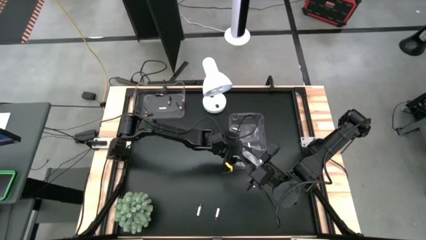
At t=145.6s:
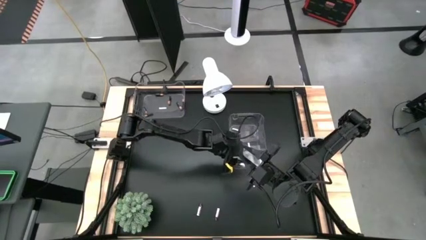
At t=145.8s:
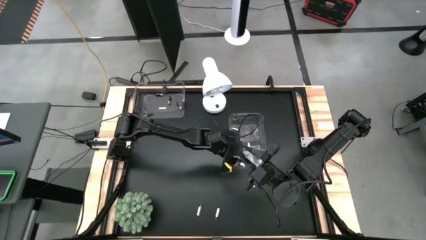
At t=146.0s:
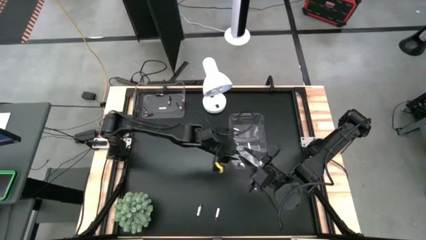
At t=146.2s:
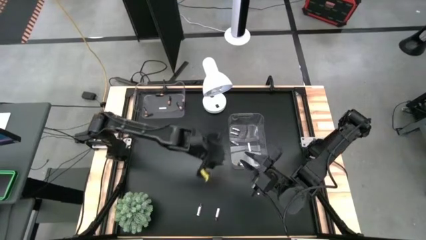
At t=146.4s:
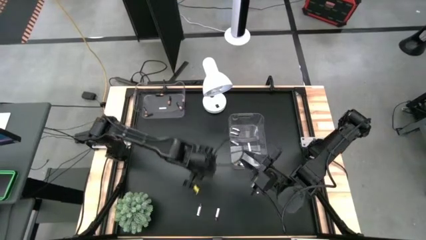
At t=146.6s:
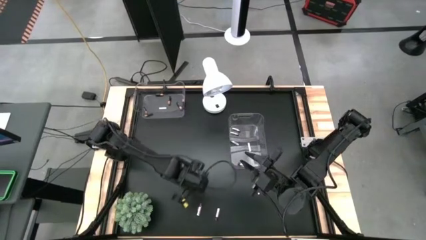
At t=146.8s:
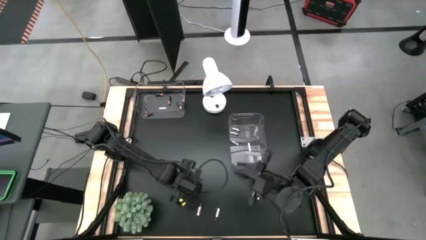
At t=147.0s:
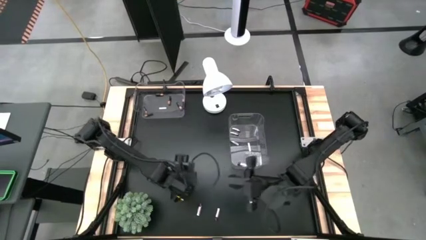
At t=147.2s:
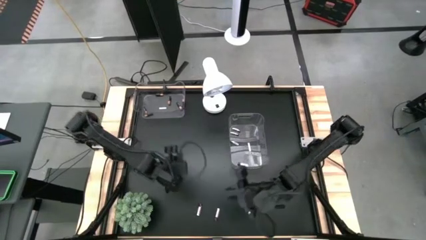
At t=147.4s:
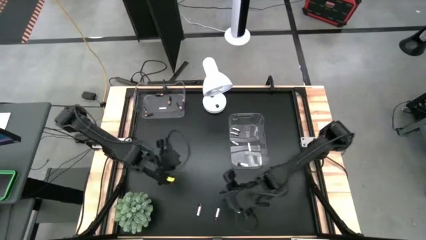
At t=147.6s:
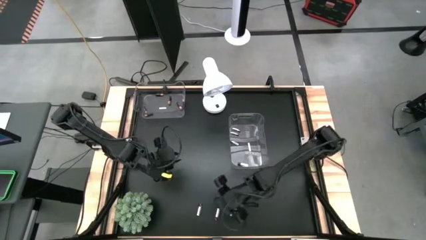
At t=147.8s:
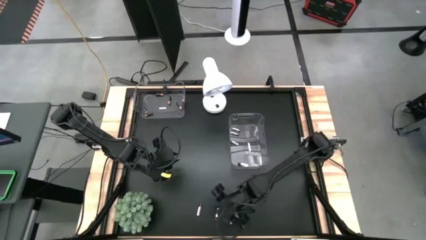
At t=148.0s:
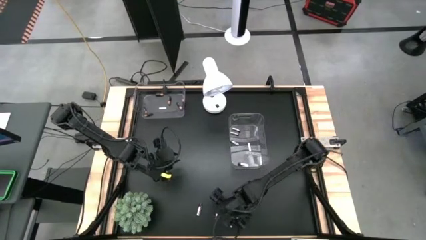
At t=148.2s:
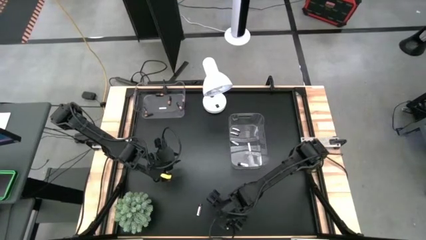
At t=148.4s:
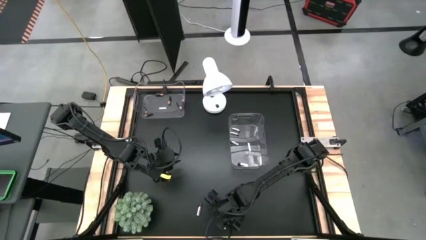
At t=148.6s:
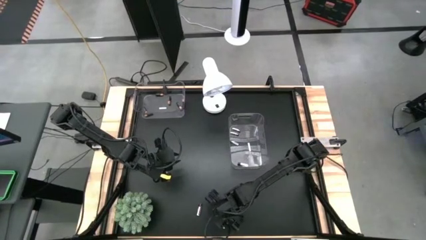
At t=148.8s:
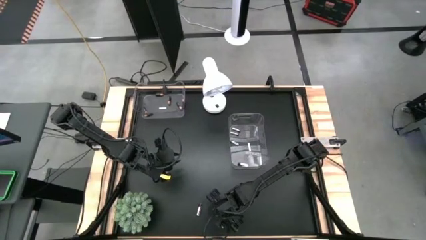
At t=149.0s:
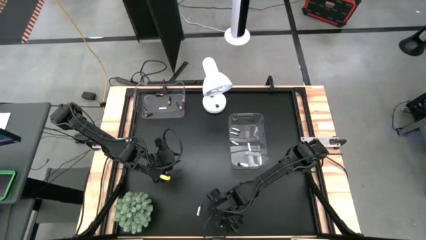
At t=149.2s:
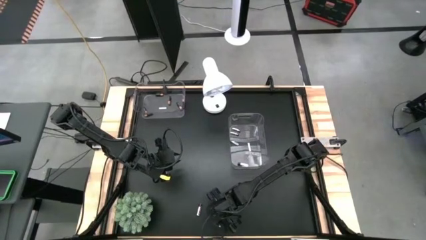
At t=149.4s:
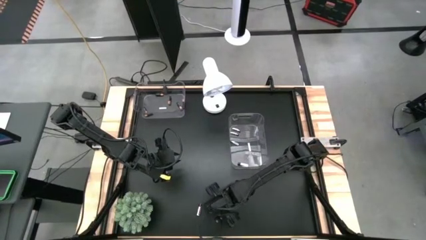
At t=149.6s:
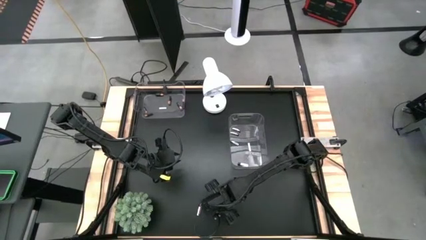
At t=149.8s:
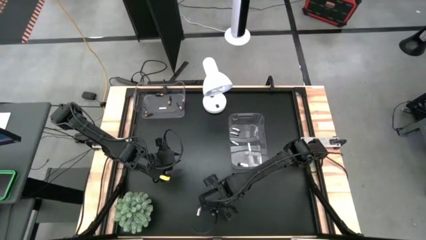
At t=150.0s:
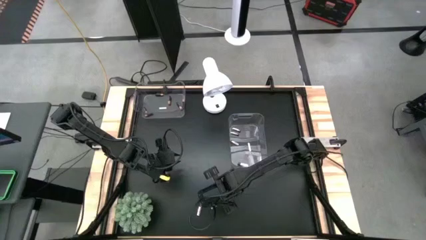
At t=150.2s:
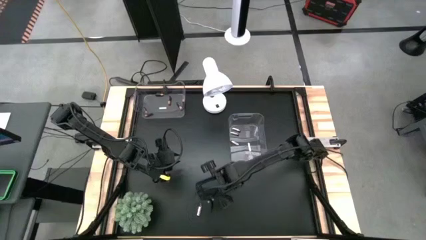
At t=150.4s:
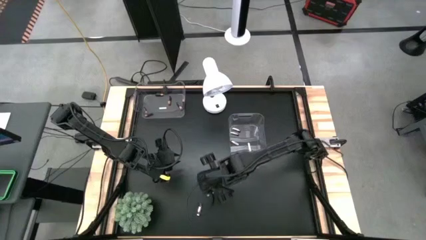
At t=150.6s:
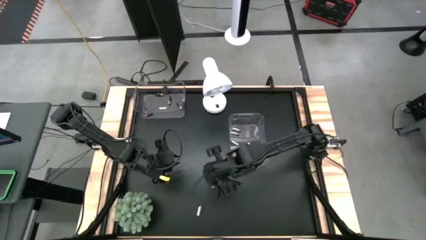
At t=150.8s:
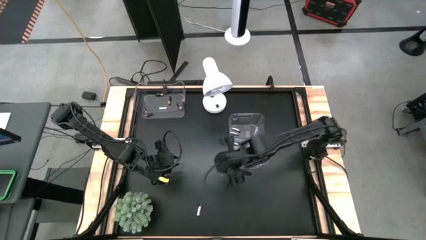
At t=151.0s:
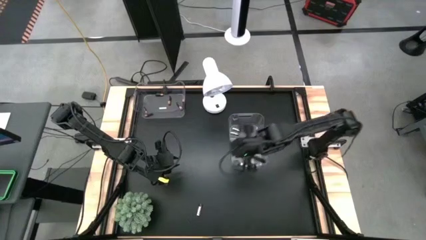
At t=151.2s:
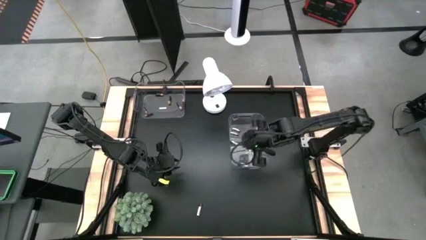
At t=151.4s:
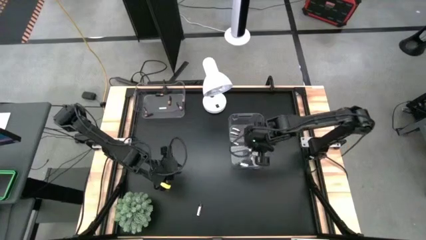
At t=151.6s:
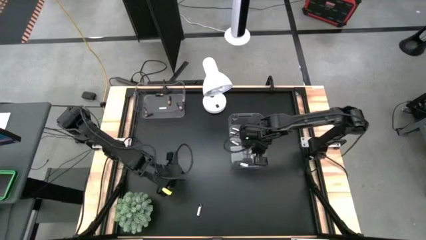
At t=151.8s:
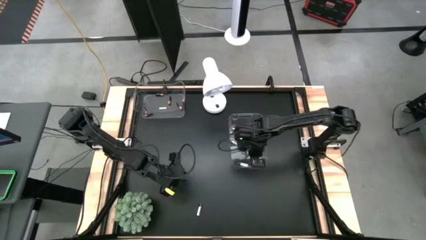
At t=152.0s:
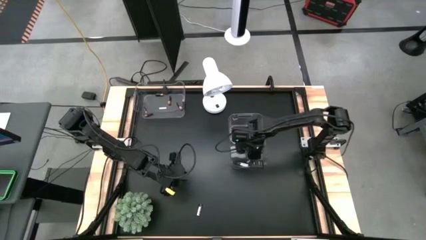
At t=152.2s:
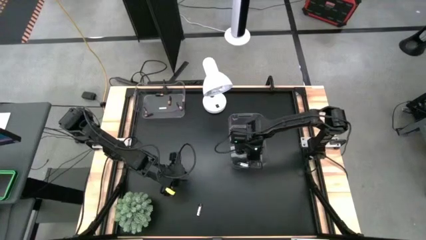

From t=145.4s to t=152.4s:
Task: Sort batteries
Put the silver battery into the bottom transparent bin

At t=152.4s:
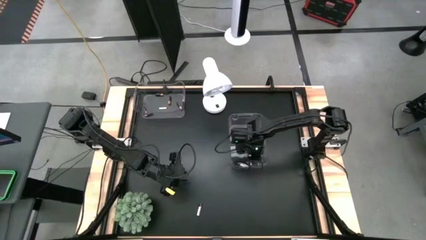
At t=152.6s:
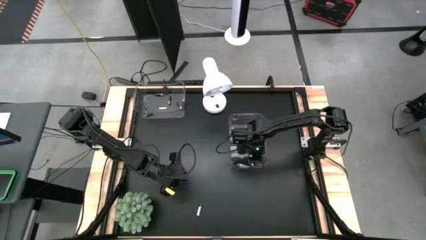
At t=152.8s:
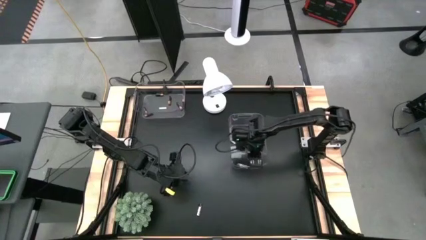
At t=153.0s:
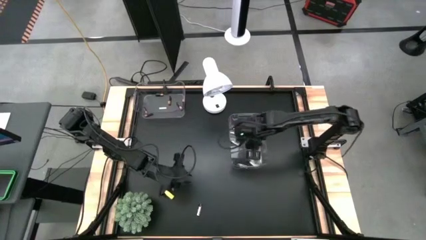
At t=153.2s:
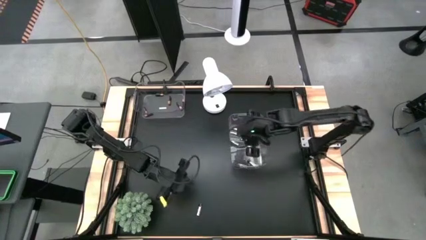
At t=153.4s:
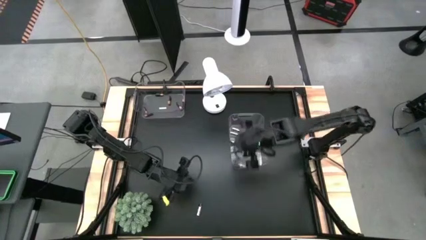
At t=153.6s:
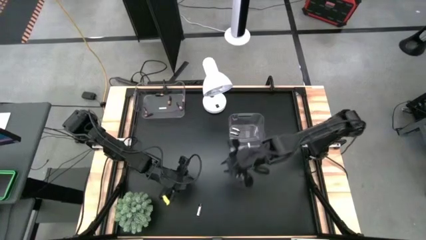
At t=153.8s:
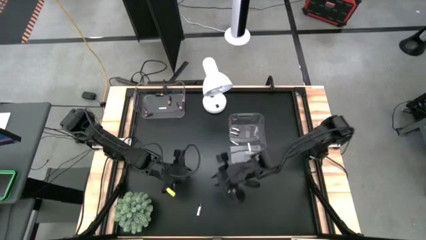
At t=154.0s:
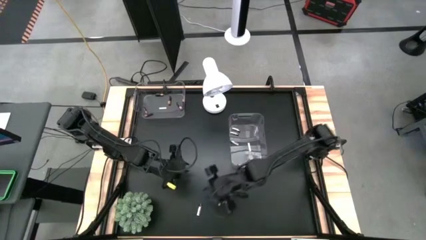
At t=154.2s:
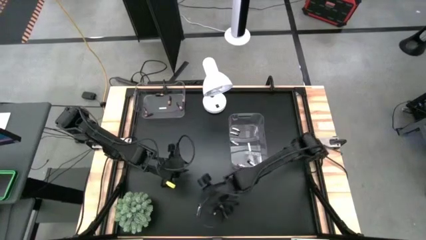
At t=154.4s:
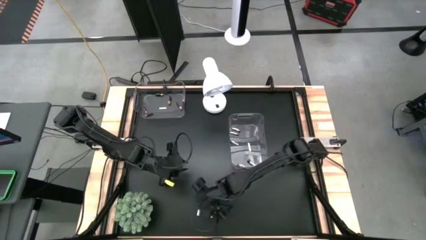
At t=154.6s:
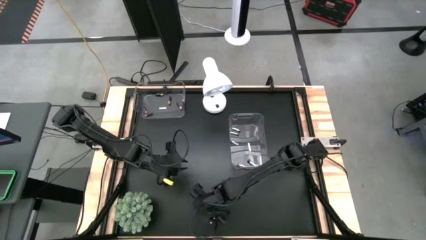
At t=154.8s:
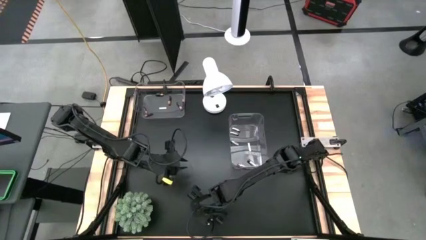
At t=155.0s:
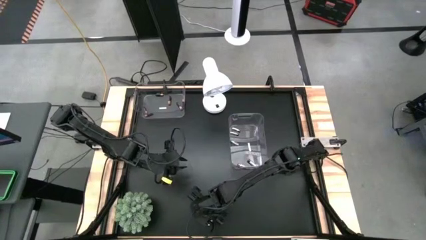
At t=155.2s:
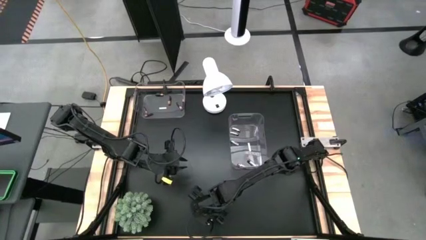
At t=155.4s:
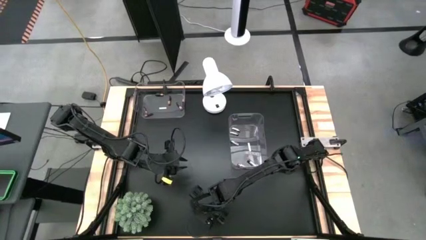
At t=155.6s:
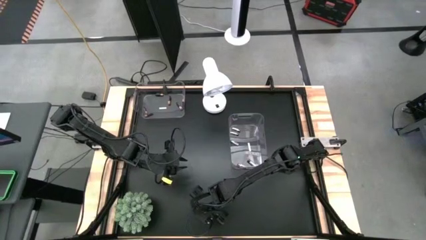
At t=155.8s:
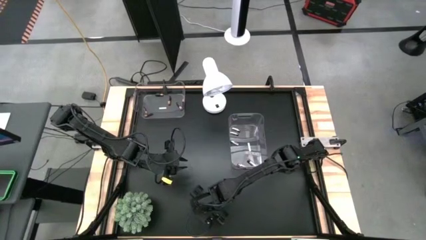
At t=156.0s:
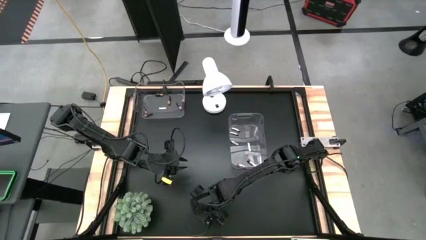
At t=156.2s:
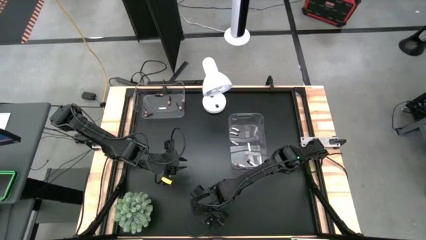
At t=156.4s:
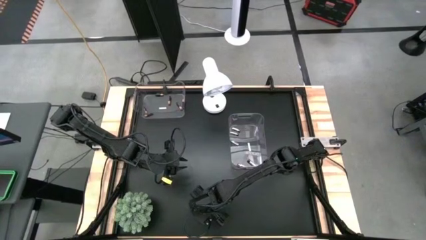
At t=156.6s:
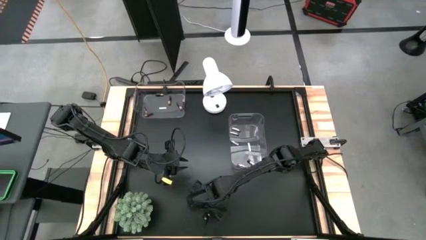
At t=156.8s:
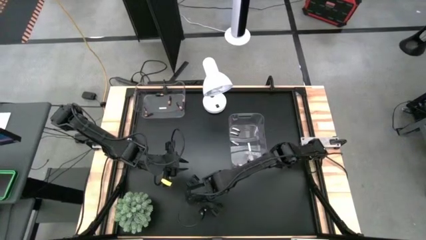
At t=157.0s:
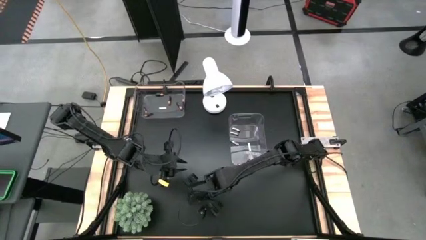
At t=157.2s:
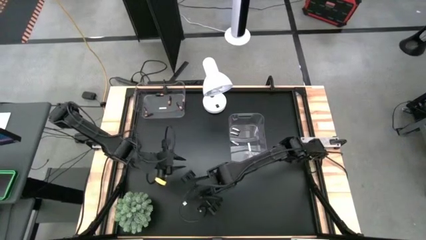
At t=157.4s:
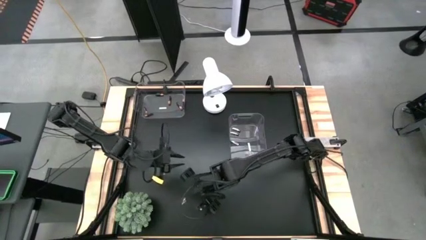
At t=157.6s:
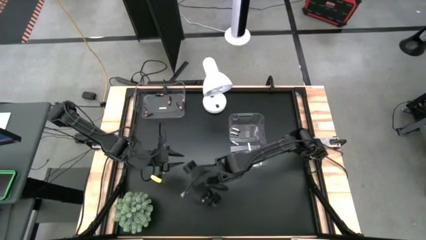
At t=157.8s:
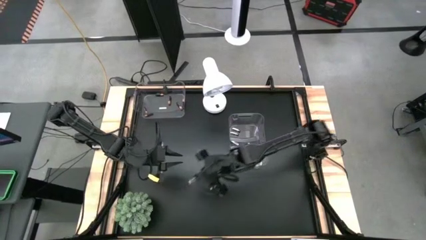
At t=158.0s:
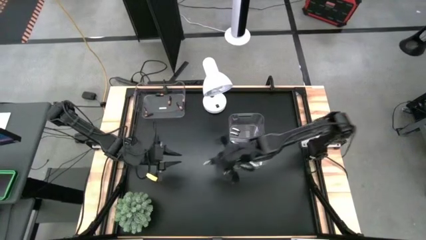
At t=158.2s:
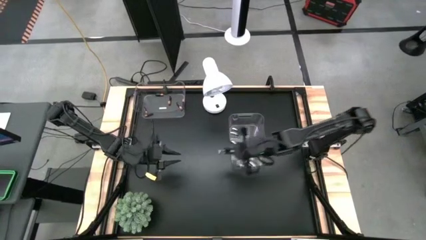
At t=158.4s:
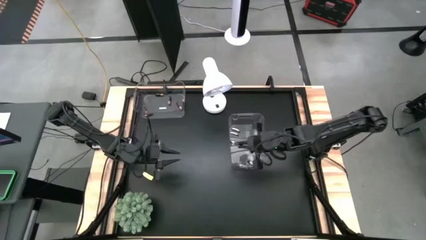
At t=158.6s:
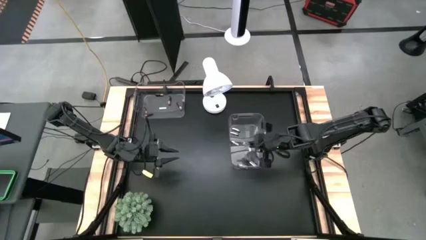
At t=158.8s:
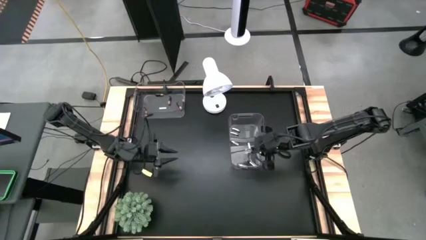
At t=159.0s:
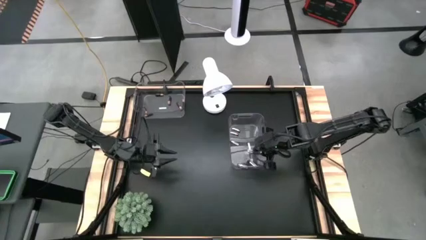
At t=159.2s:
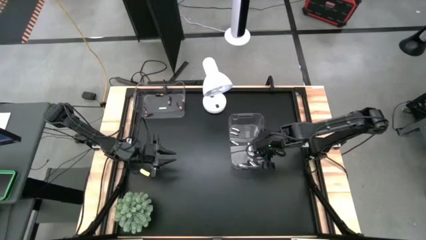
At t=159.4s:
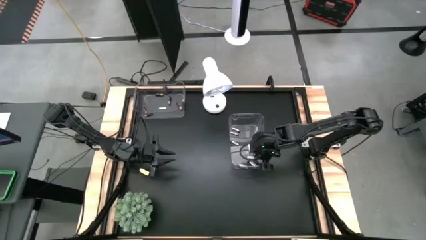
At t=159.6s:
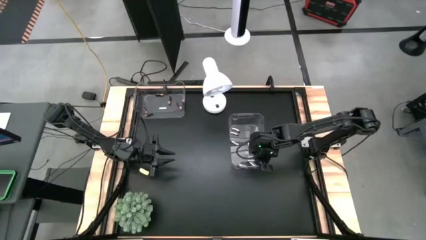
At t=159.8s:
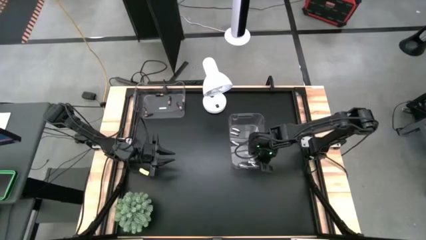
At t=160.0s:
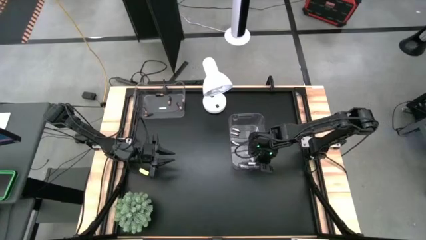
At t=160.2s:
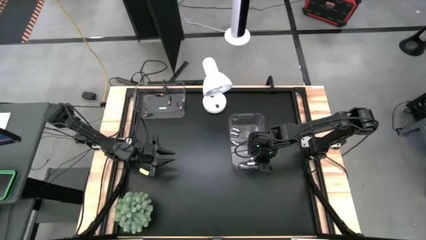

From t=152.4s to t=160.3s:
Put the silver battery into the bottom transparent bin
